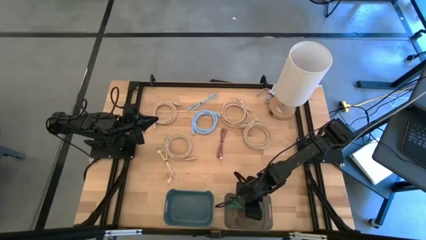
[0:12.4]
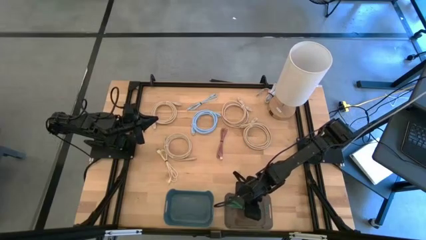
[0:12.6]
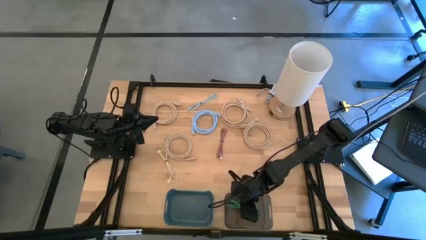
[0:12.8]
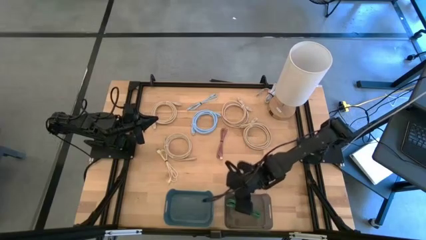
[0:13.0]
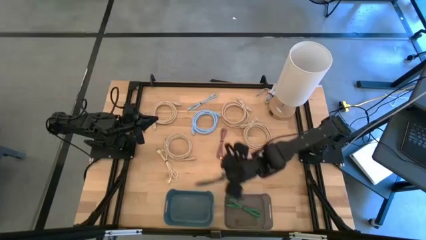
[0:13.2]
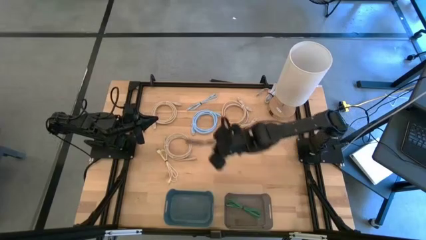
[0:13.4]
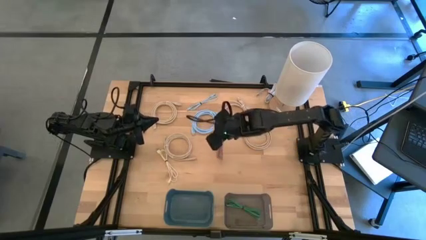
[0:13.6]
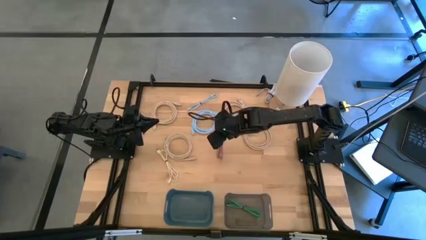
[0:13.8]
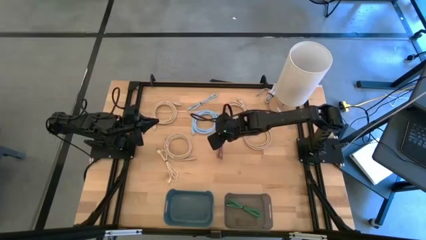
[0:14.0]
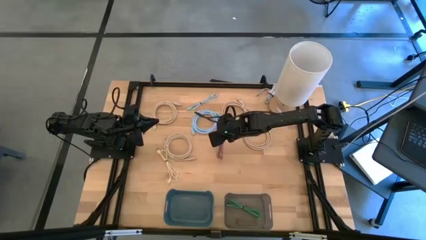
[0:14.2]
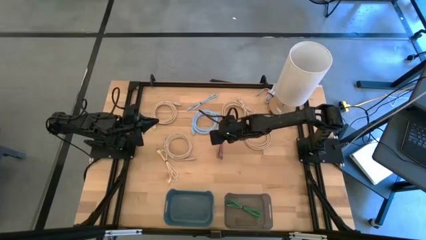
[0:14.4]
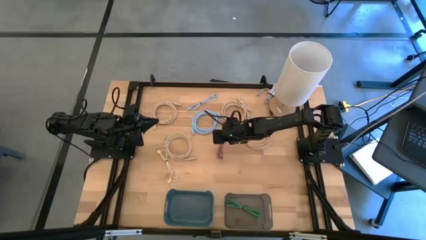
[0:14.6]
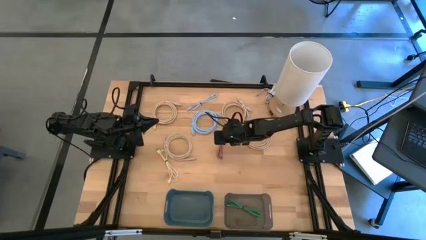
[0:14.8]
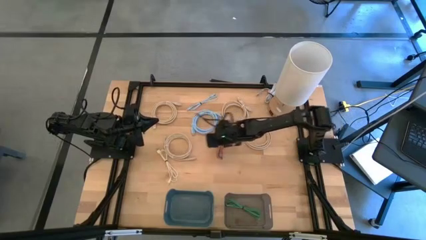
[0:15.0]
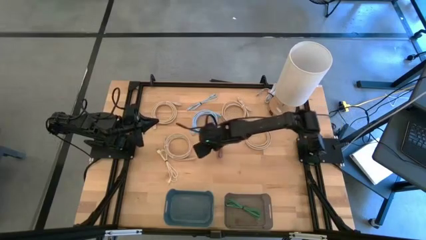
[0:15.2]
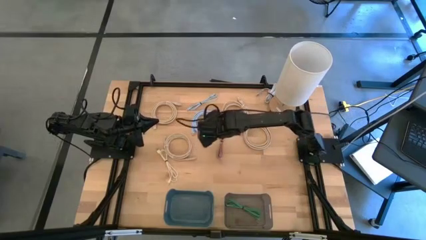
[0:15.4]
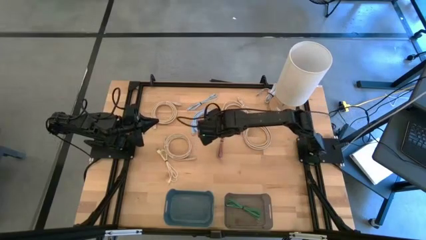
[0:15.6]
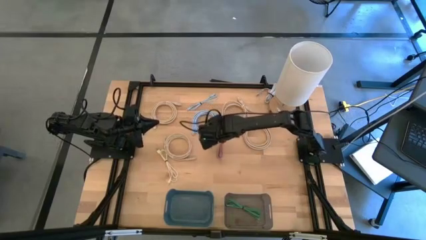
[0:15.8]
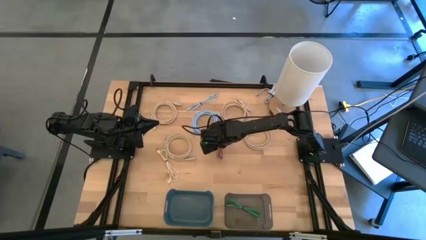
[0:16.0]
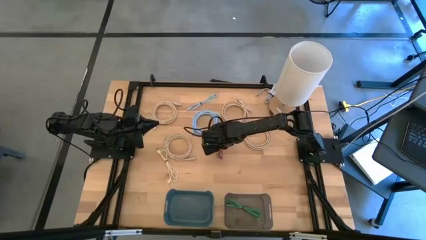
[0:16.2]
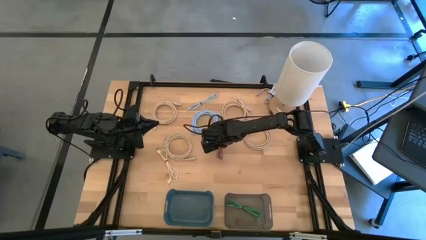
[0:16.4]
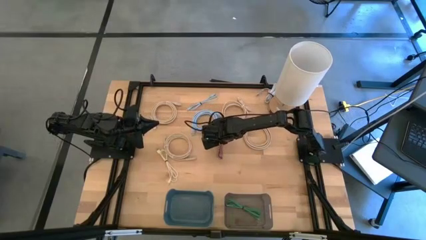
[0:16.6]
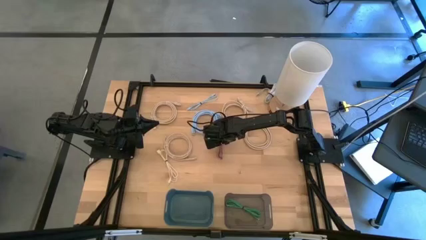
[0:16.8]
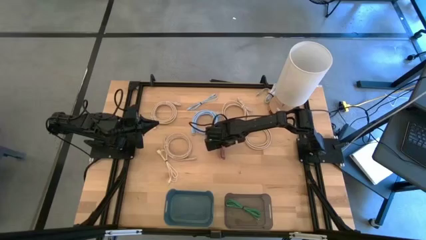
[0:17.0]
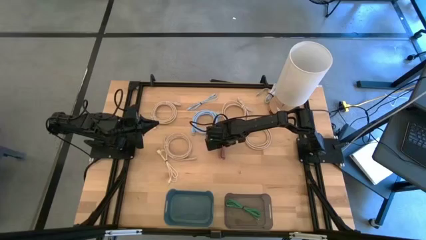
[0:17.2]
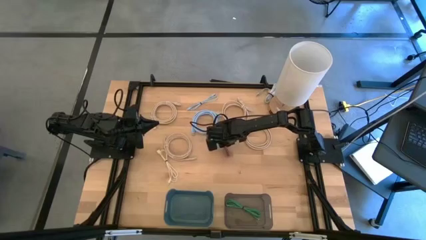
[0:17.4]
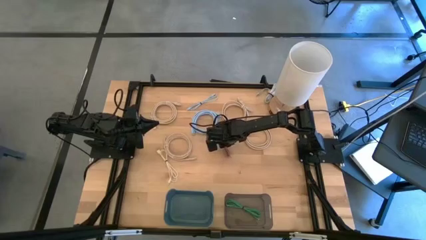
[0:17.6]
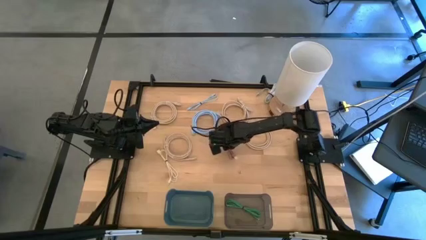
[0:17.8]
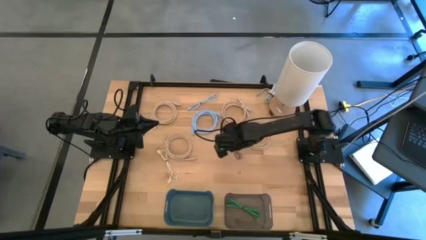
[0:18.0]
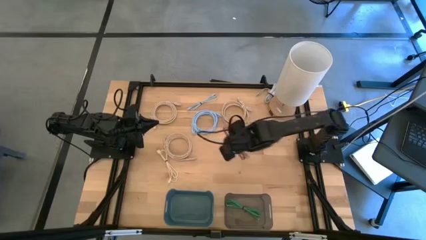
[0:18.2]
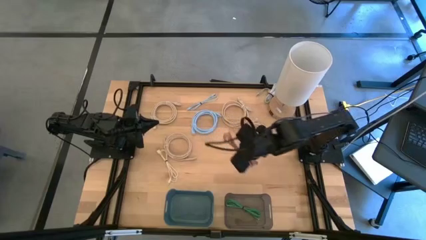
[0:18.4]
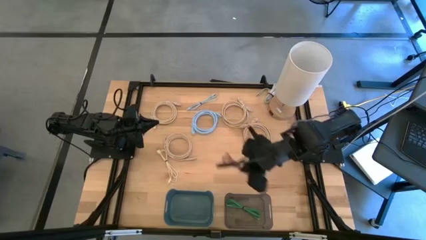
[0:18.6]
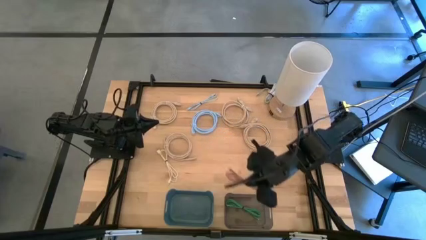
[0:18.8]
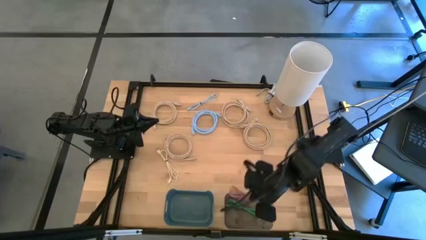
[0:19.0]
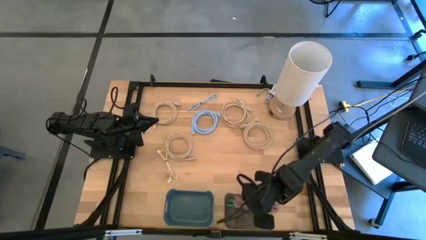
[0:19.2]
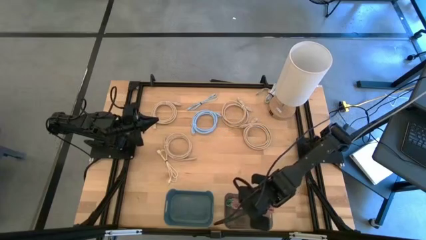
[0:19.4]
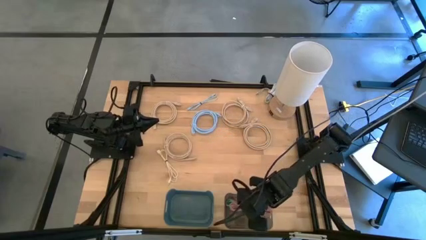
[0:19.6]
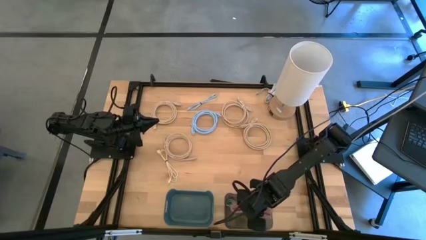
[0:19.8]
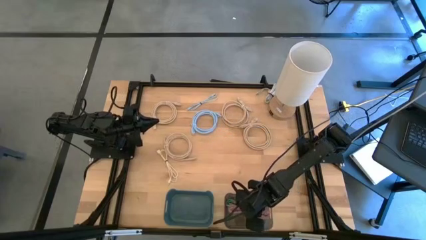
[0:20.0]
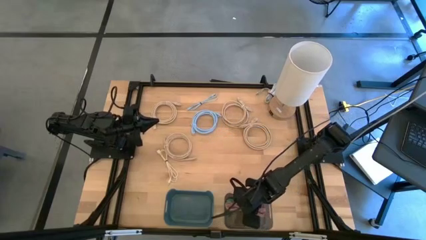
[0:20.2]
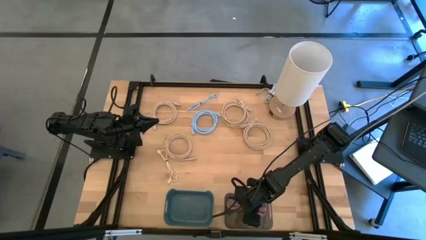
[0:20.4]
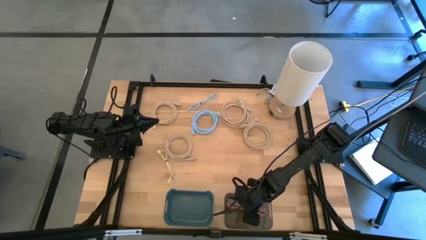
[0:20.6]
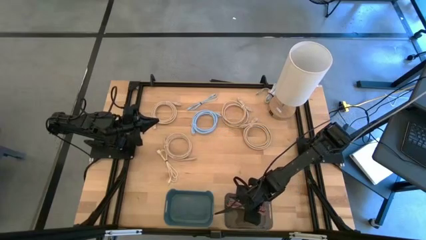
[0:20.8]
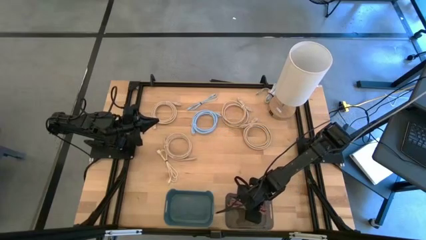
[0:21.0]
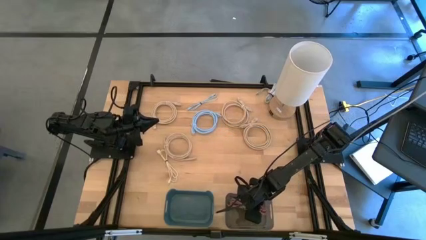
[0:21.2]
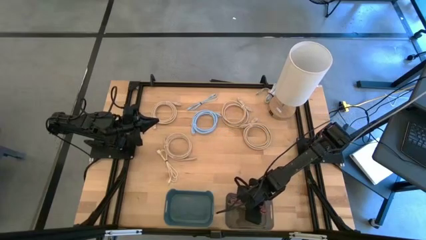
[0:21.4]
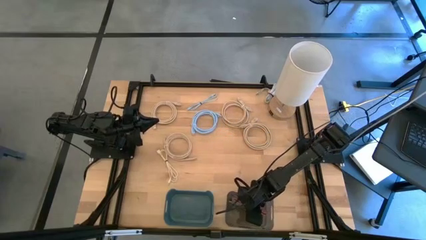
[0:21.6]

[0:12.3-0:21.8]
Put the pink charger cable into the black bin
